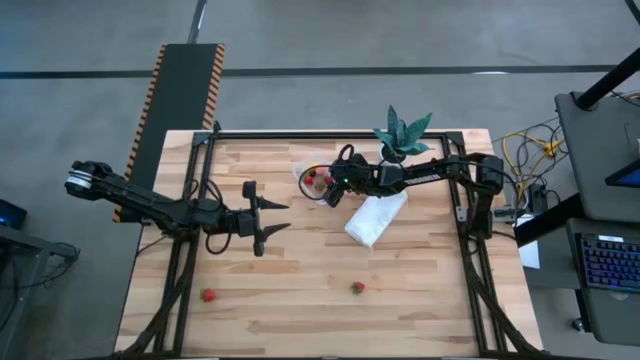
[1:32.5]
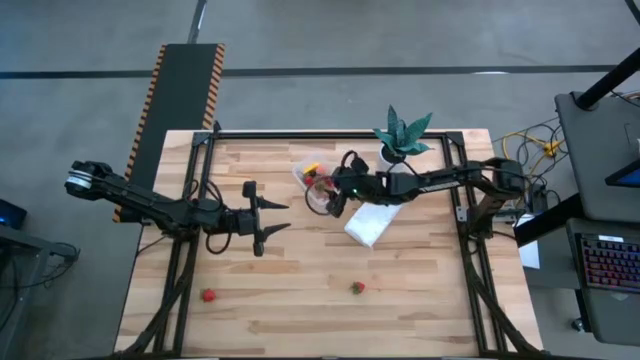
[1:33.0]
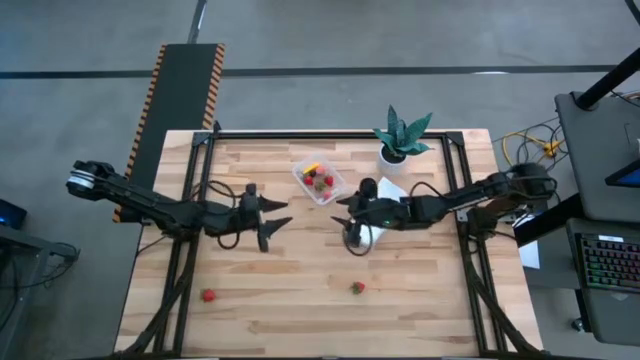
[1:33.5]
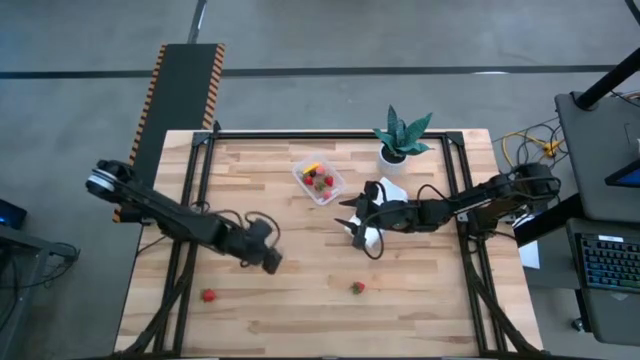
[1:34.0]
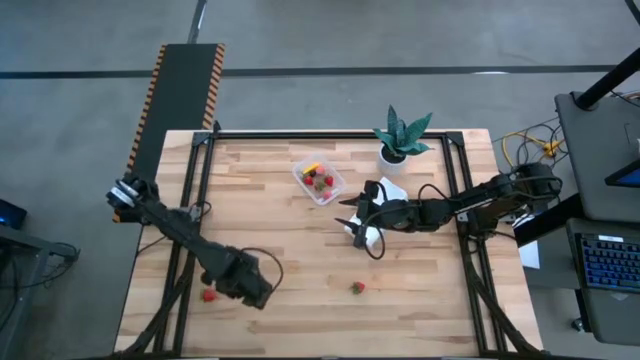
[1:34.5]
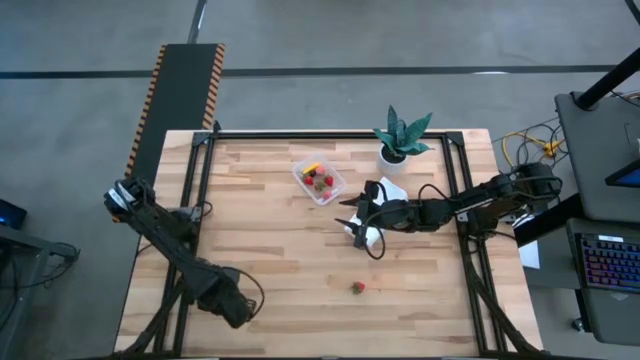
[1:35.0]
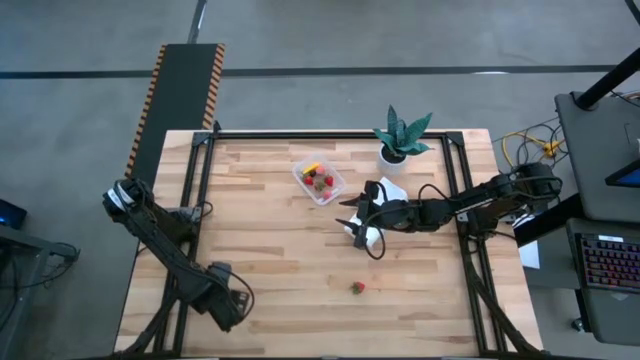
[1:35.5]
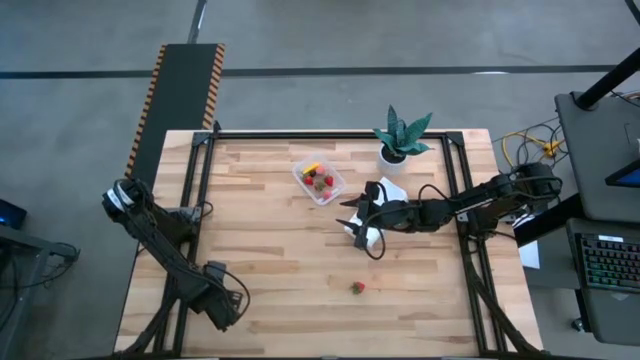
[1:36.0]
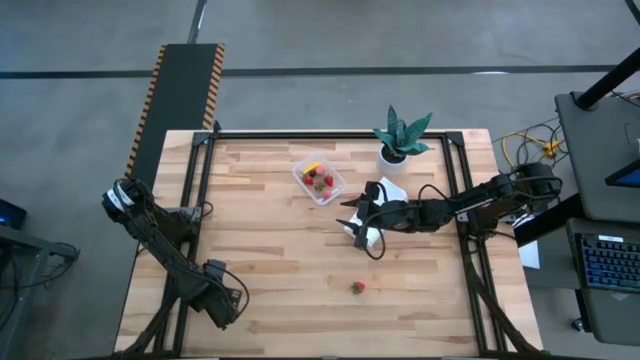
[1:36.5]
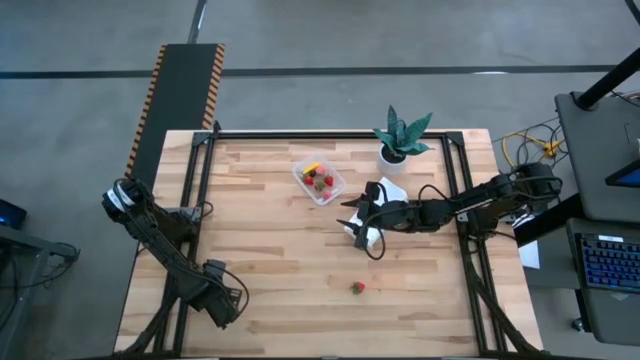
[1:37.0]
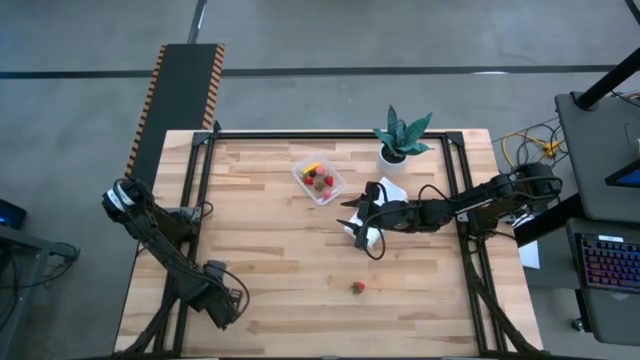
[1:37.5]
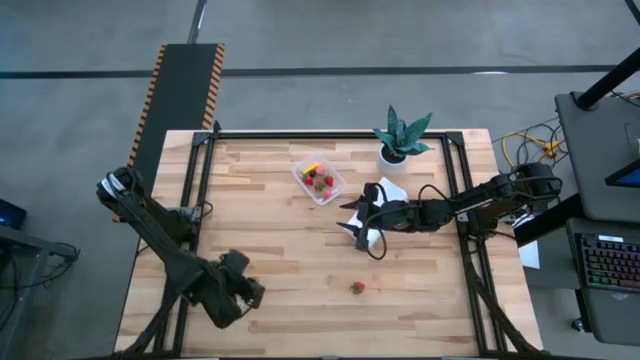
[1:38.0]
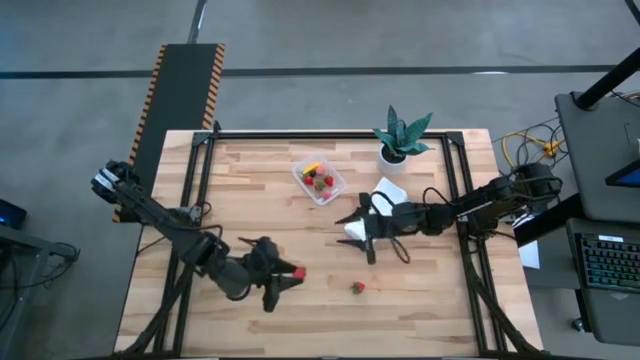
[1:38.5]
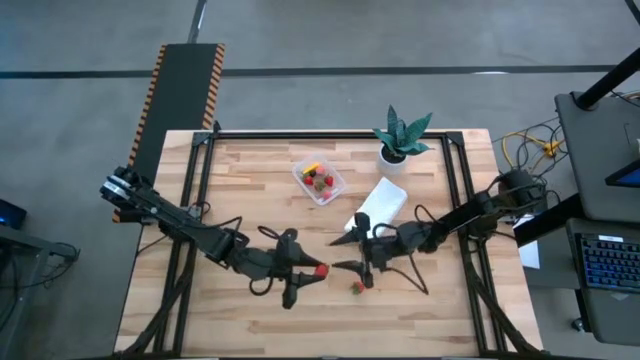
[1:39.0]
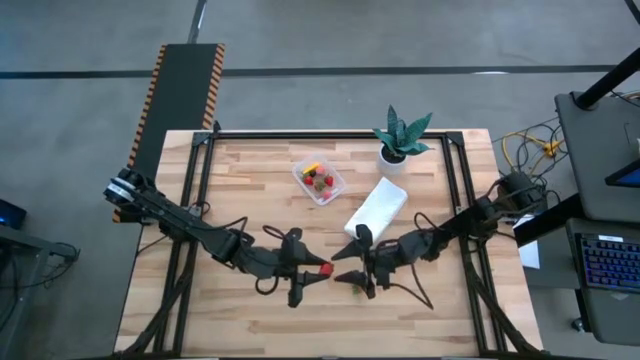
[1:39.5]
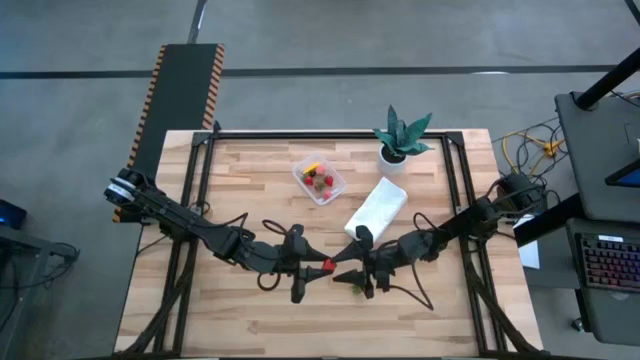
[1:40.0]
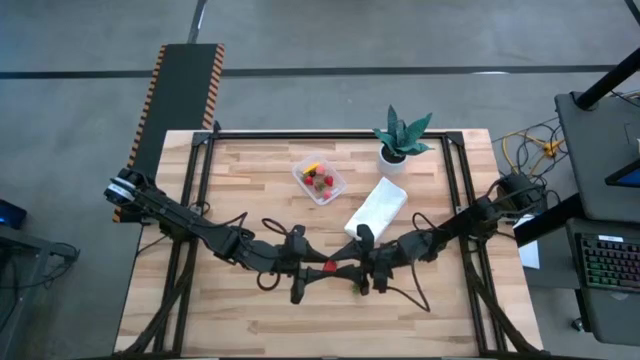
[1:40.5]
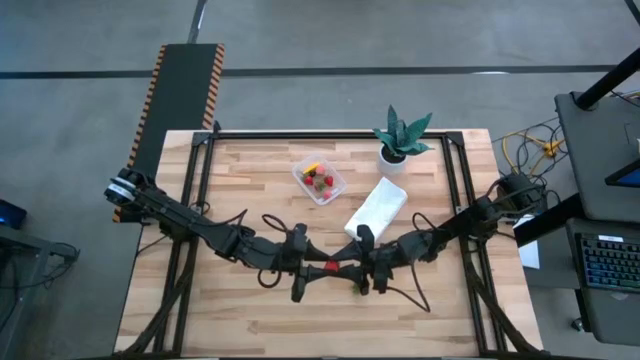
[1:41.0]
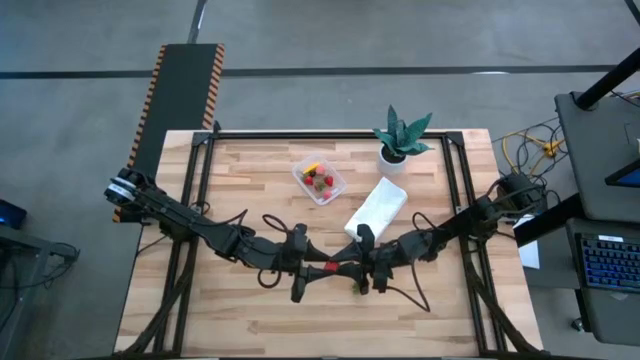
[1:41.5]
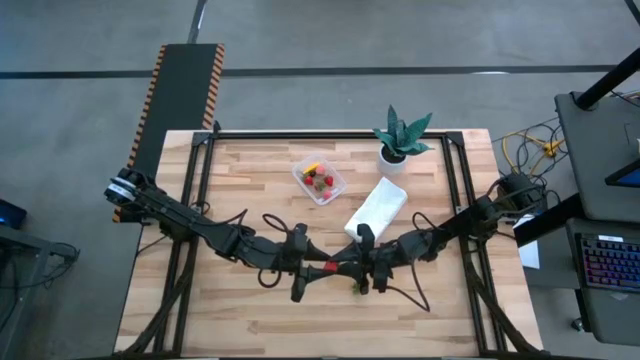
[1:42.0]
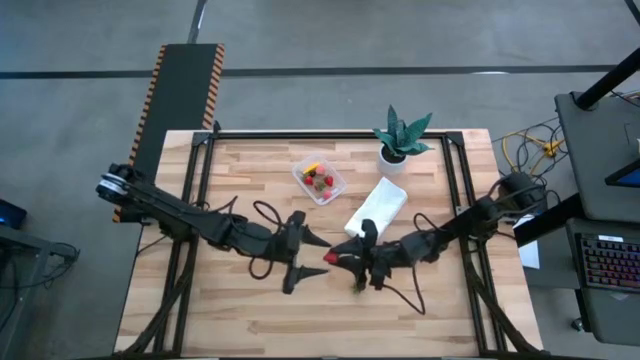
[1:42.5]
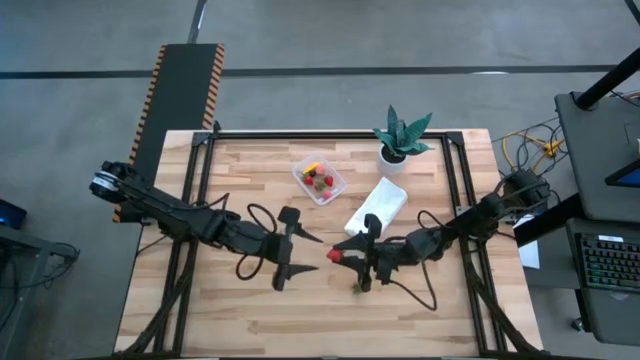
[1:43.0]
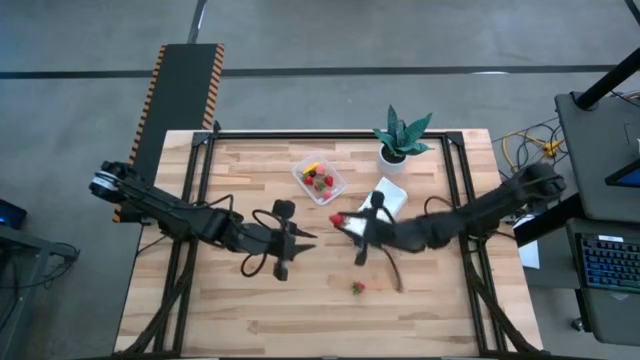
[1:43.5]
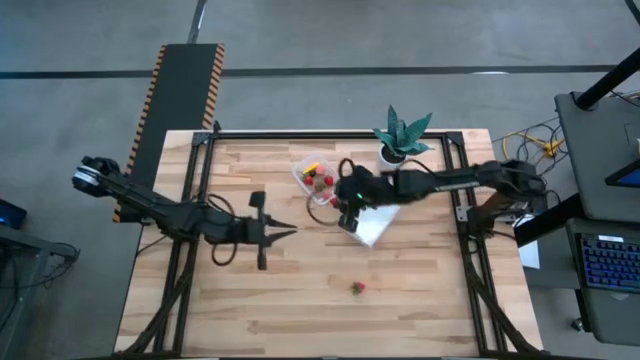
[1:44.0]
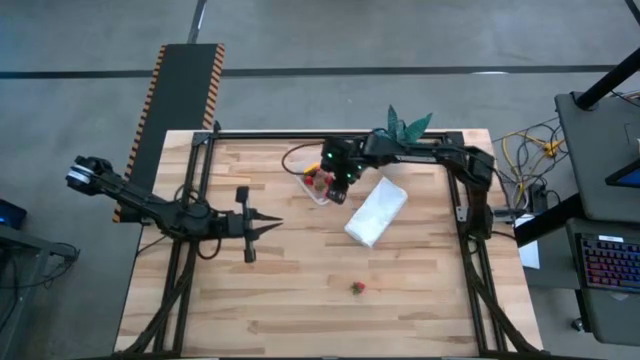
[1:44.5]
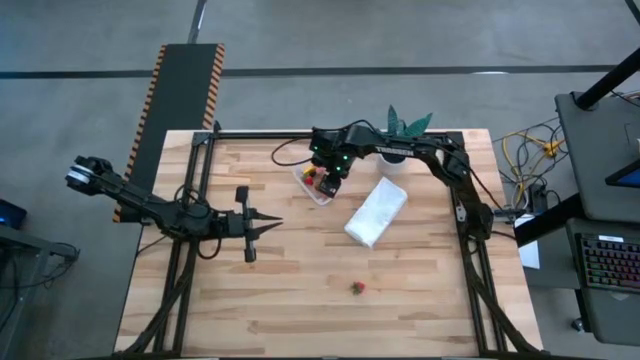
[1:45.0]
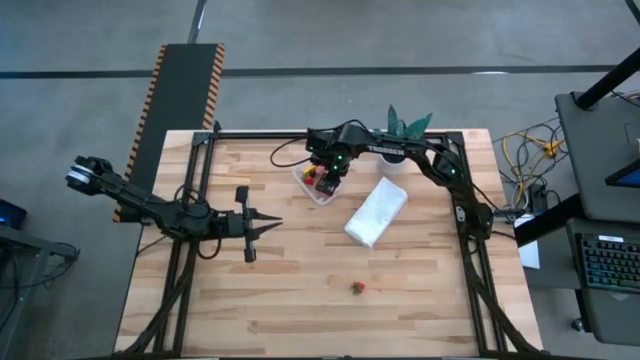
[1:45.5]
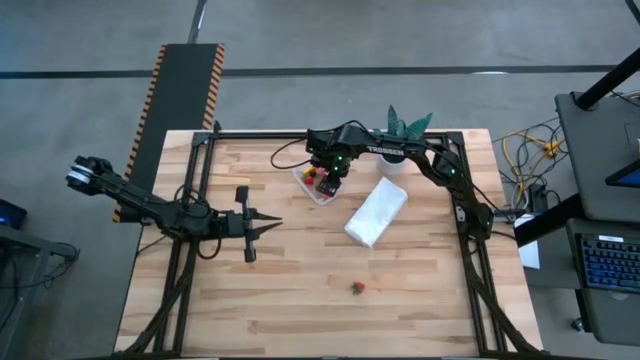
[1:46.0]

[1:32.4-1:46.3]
Task: Pick and placing Produce into tupperware
Put the strawberry into the transparent bin

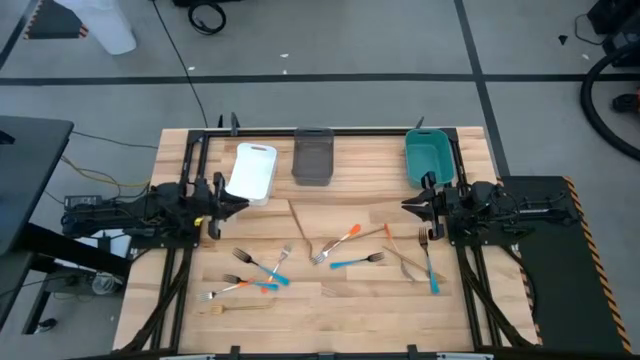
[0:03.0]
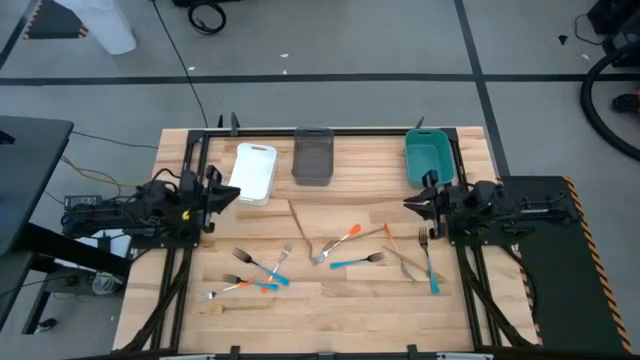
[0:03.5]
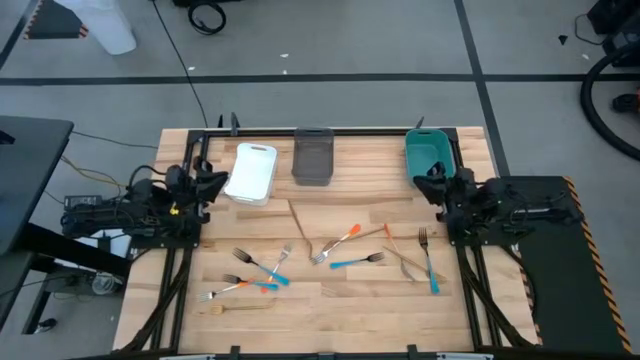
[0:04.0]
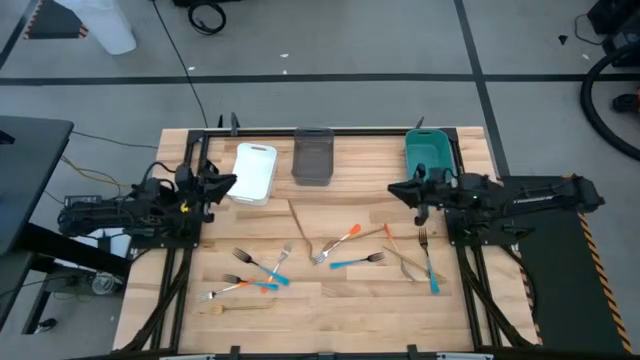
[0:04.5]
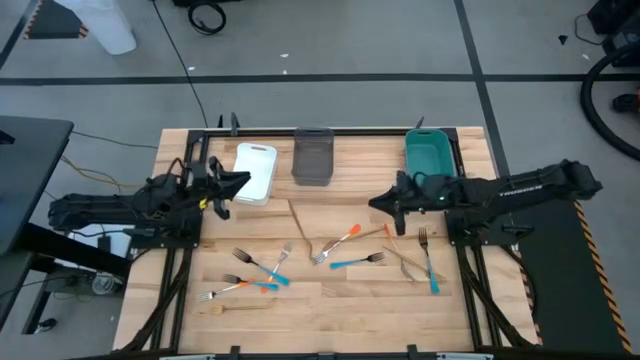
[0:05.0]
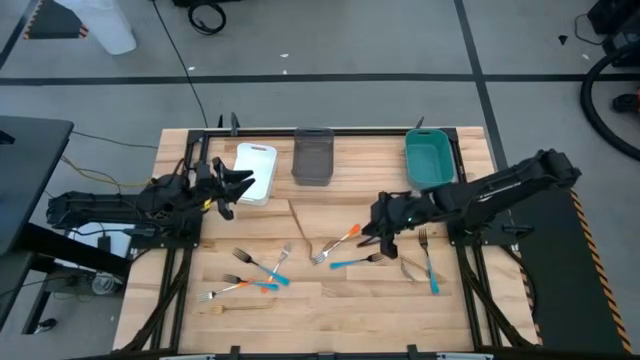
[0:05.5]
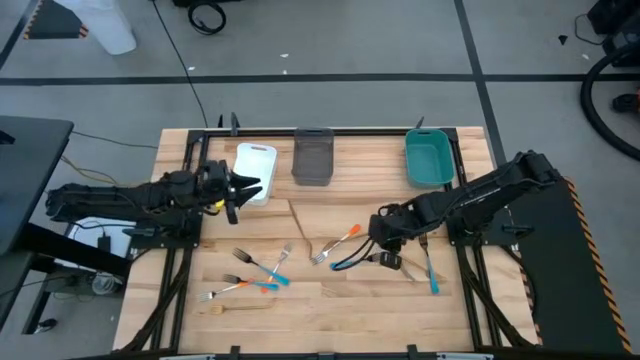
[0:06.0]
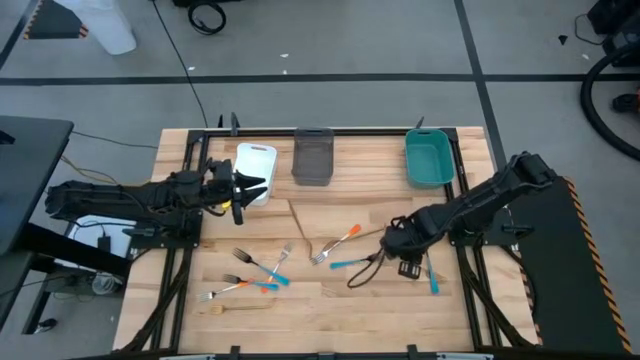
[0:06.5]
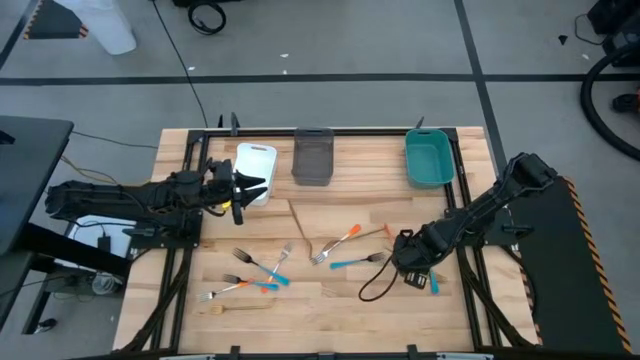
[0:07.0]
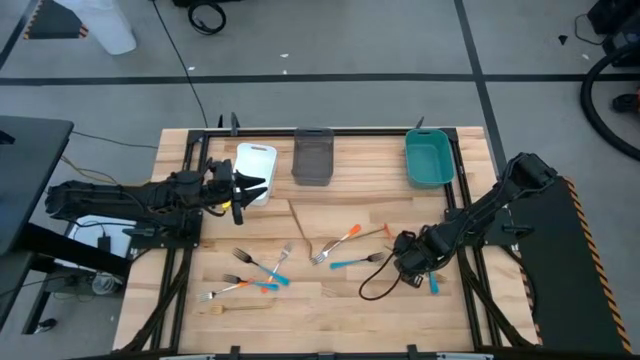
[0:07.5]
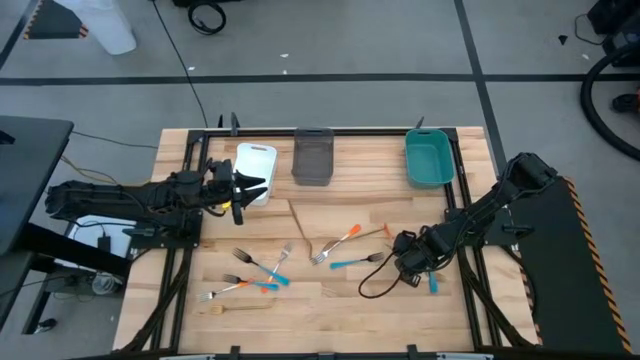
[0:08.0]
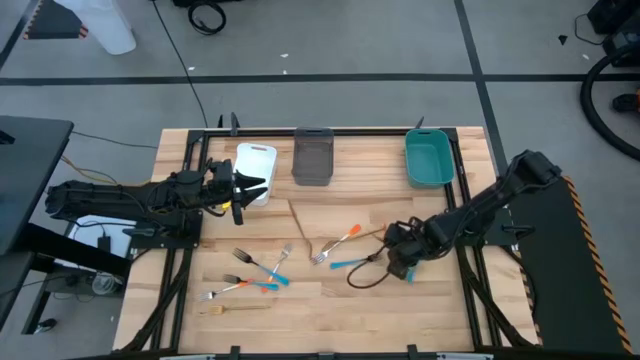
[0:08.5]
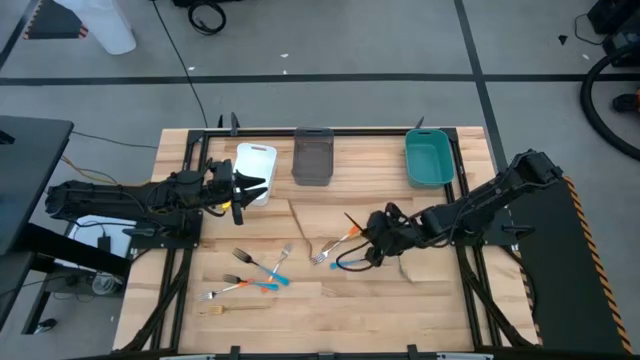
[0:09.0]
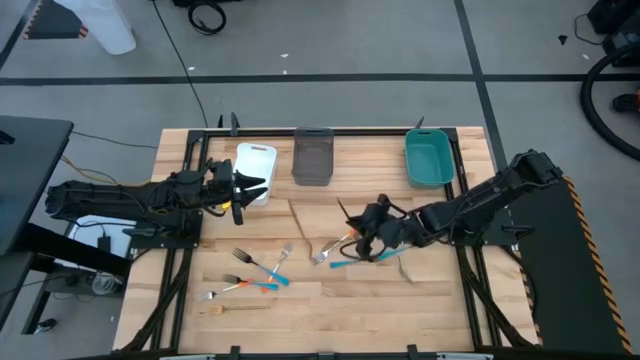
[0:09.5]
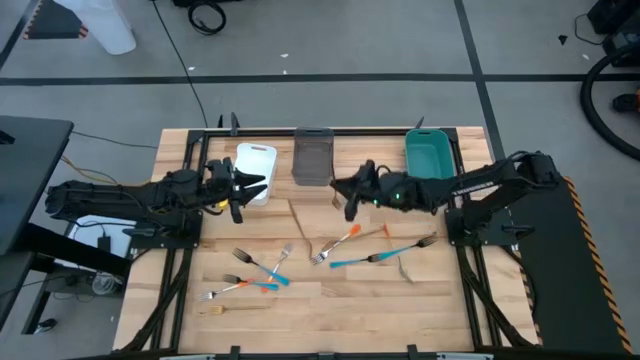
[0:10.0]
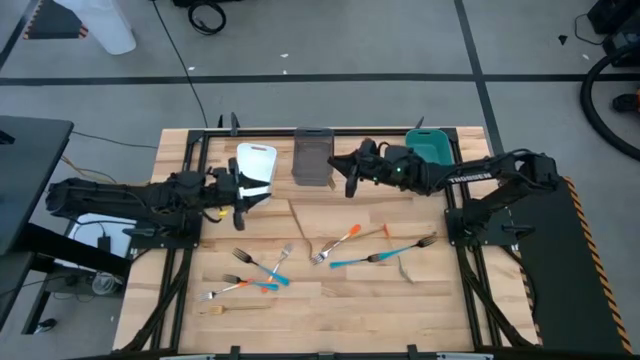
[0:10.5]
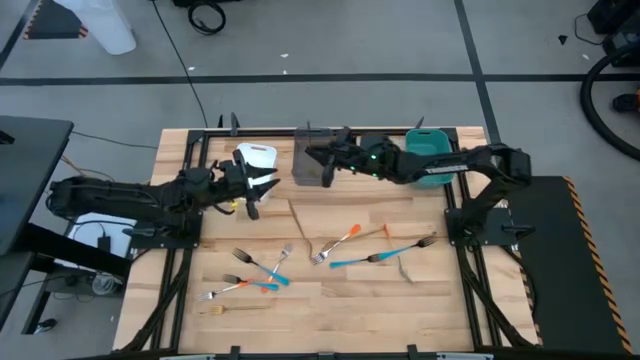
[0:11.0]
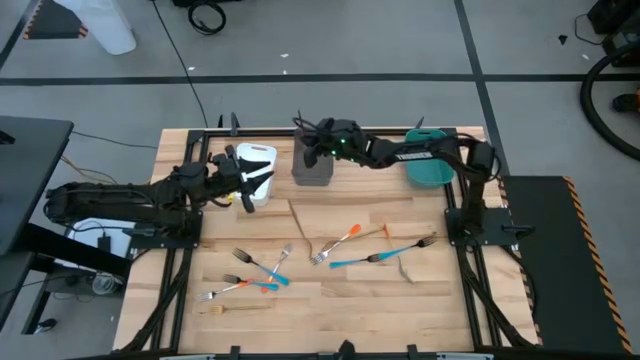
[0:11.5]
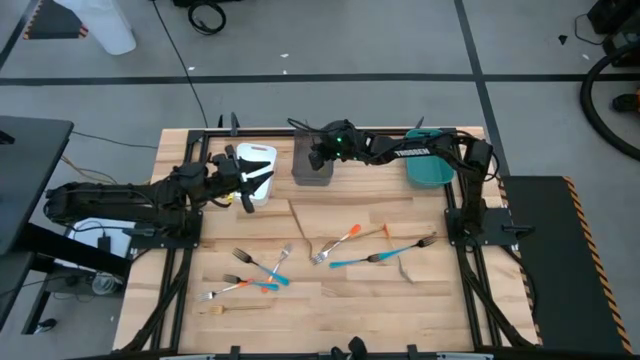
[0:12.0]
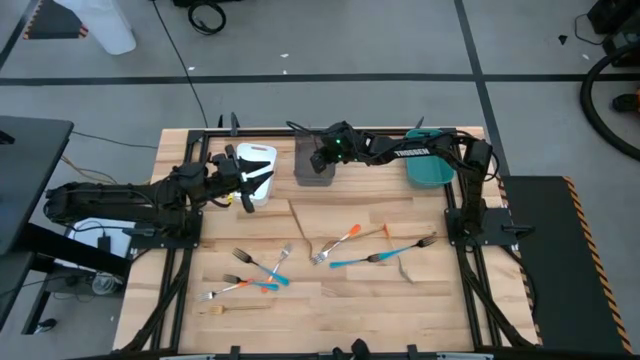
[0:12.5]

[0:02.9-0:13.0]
Task: Sort silverware by color (type)
Put the yellow fork into the black bin
